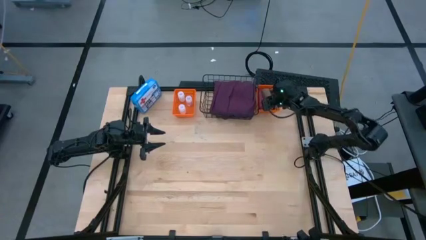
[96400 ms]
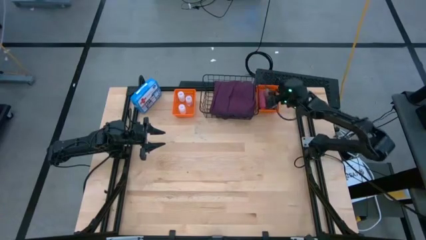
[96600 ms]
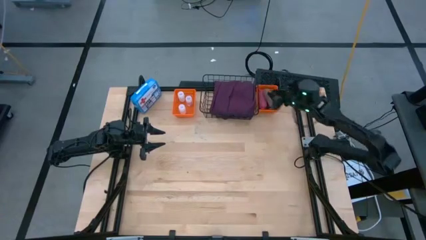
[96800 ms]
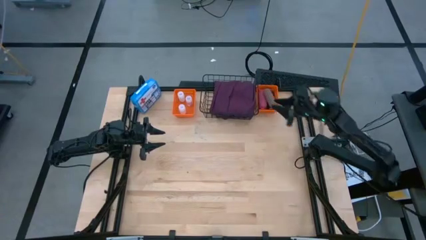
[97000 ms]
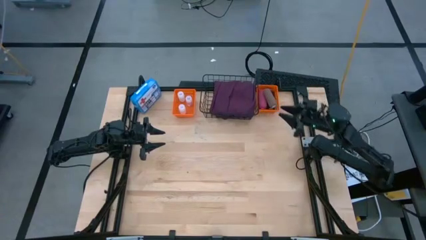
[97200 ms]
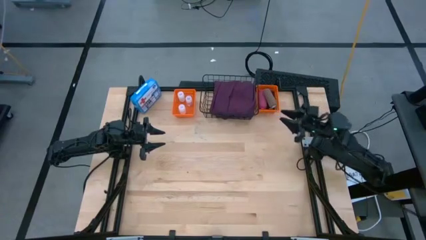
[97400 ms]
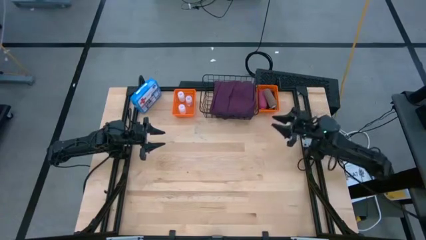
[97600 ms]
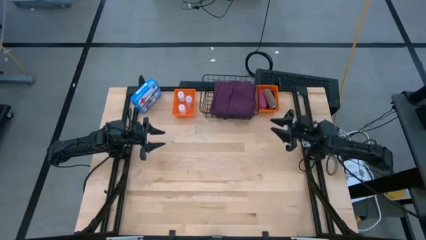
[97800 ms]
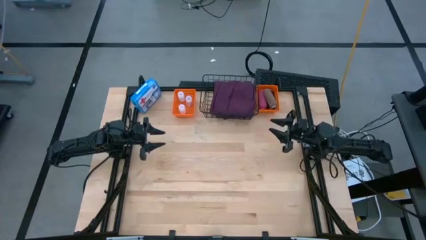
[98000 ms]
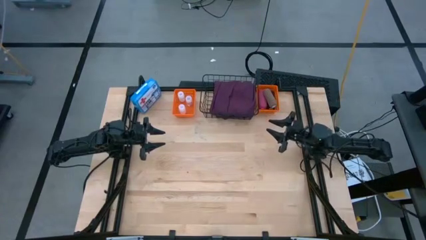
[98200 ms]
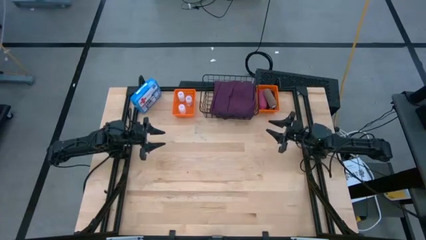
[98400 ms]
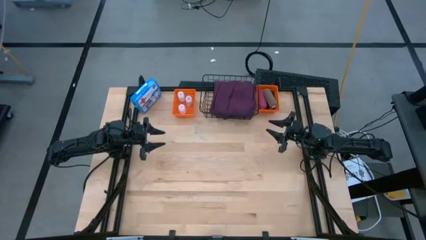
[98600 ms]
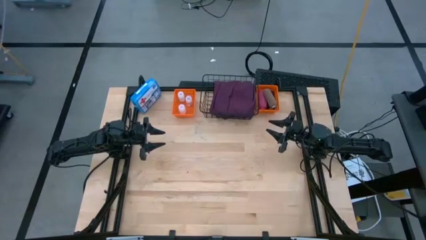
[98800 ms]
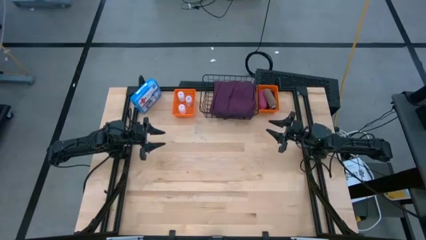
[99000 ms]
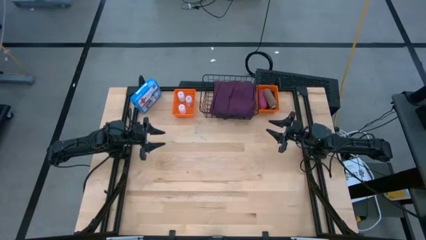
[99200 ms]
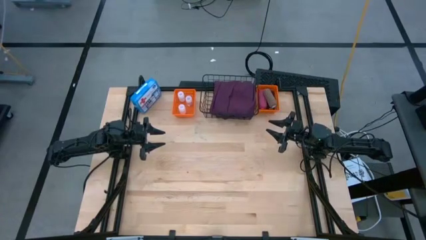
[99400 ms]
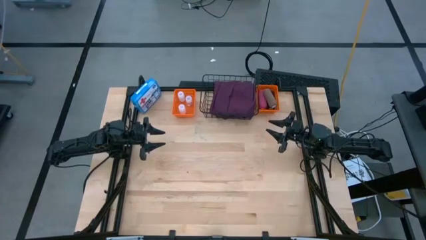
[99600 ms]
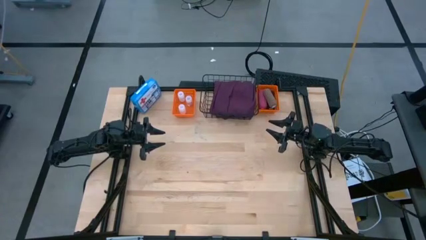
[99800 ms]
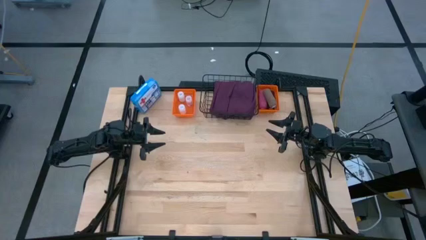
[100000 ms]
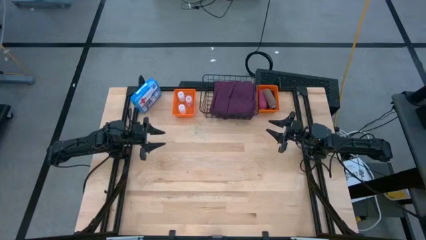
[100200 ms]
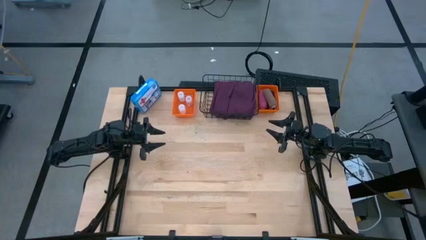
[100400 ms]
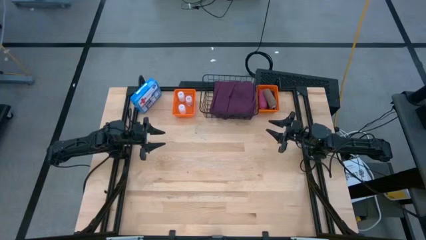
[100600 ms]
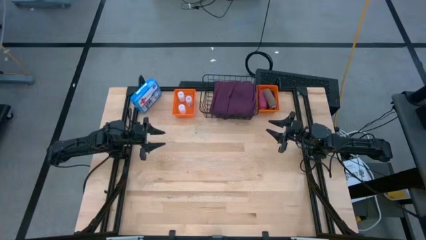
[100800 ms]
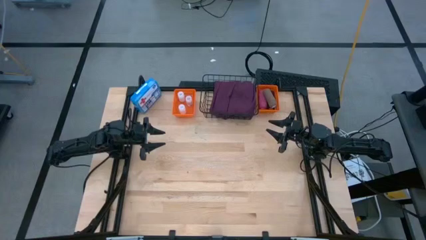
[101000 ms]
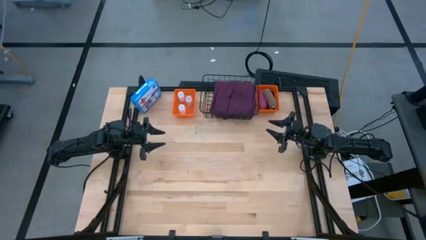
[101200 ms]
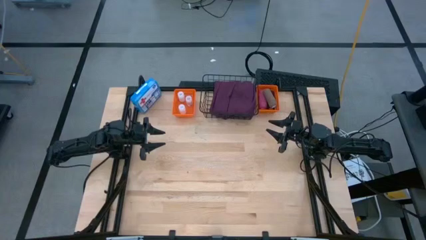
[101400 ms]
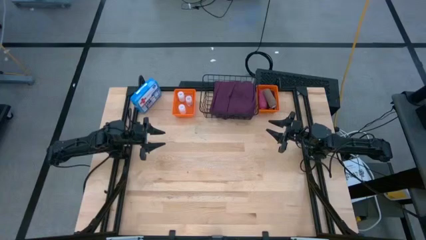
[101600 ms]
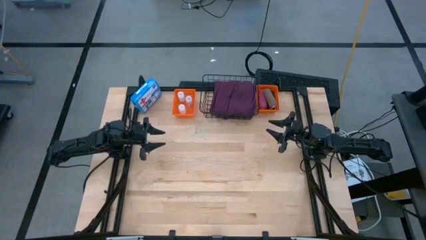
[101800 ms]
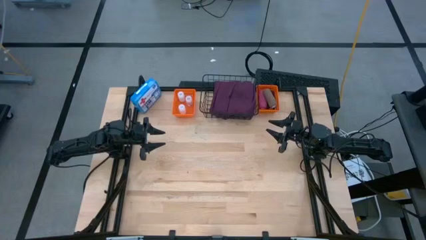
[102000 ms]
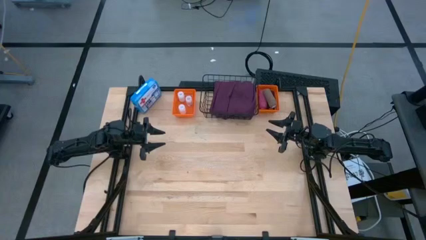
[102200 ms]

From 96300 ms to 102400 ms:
Task: Pick & place medical supplies in basket/bin
Return to Home Position

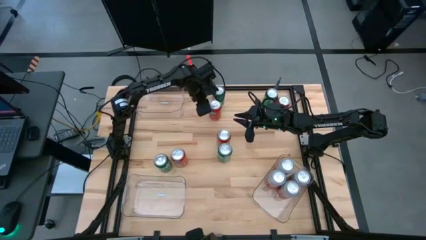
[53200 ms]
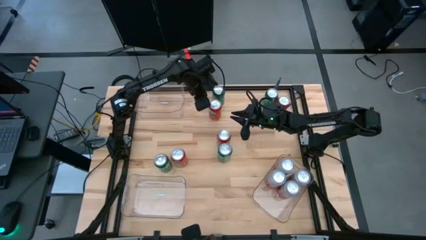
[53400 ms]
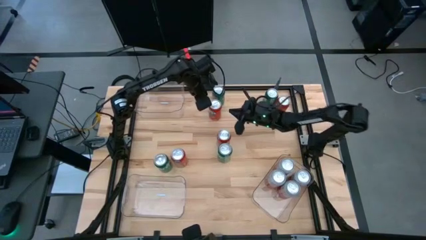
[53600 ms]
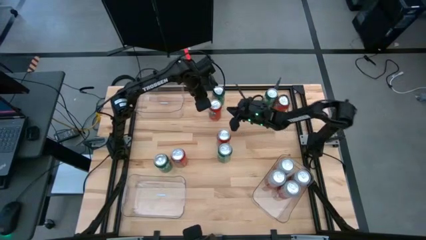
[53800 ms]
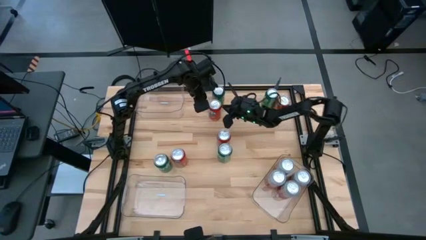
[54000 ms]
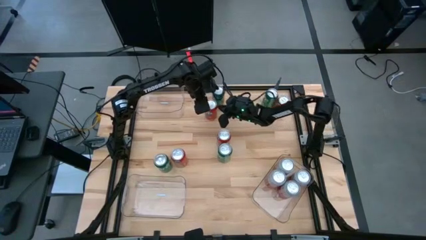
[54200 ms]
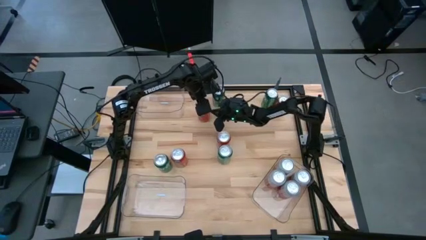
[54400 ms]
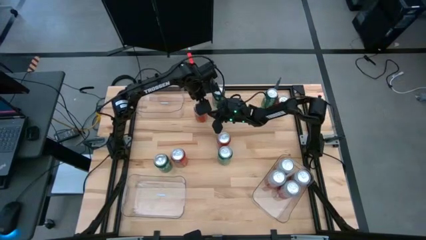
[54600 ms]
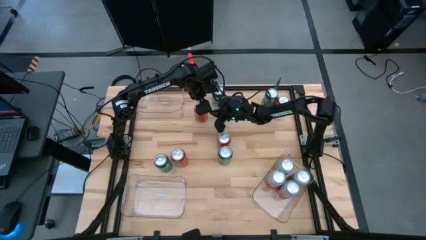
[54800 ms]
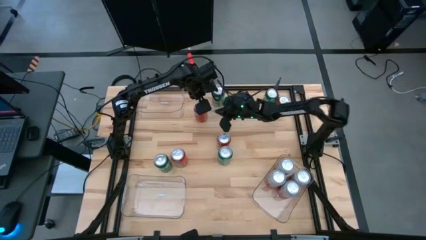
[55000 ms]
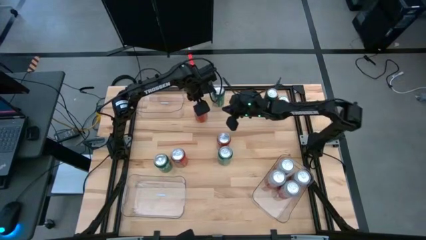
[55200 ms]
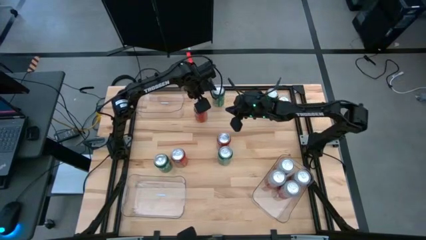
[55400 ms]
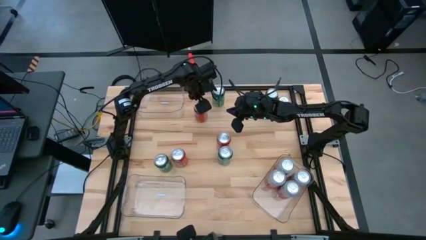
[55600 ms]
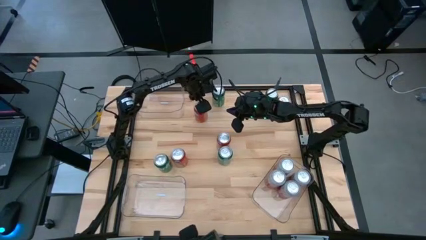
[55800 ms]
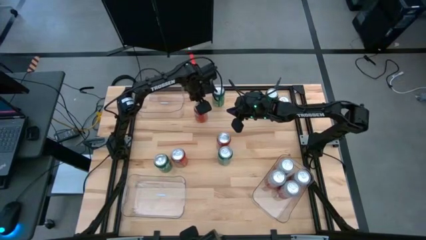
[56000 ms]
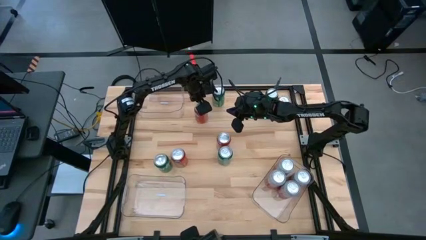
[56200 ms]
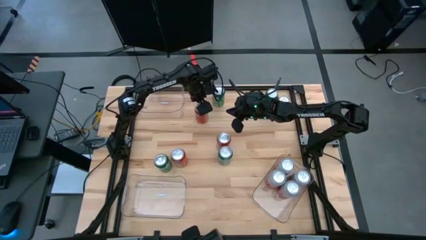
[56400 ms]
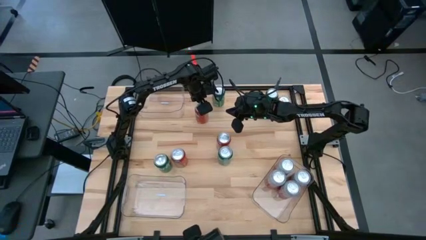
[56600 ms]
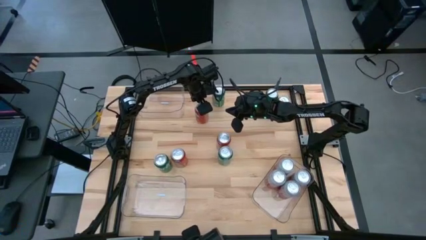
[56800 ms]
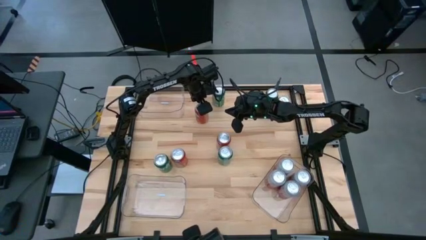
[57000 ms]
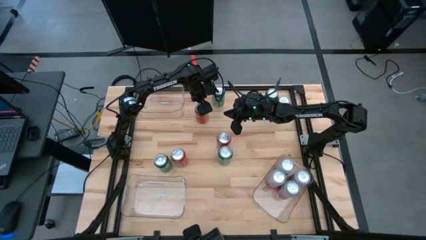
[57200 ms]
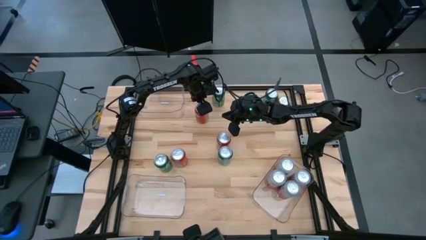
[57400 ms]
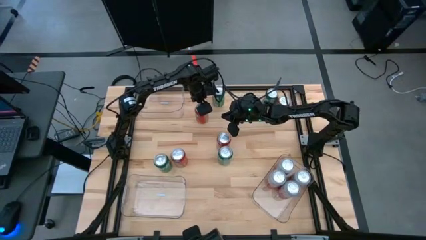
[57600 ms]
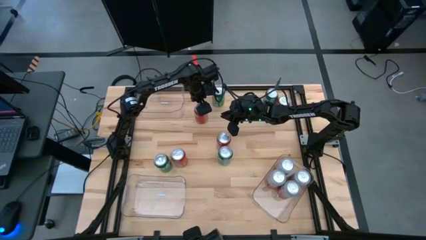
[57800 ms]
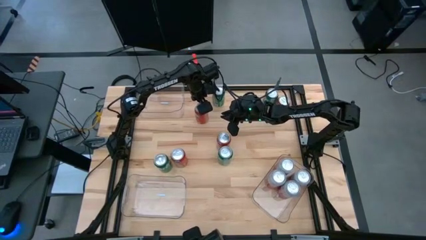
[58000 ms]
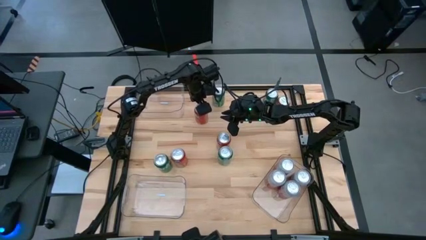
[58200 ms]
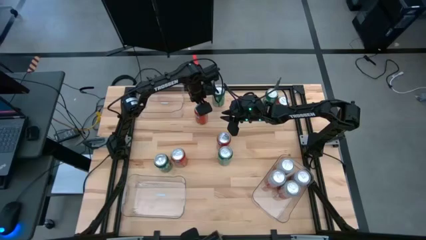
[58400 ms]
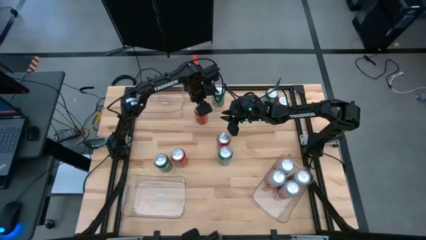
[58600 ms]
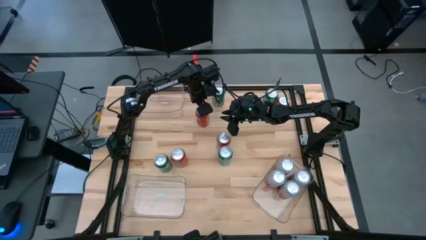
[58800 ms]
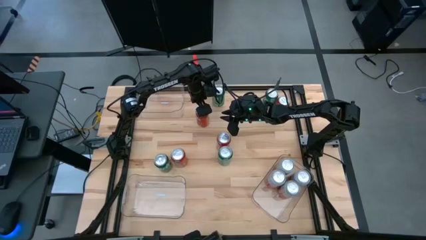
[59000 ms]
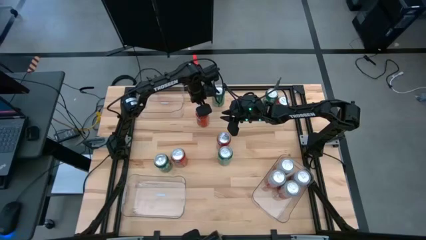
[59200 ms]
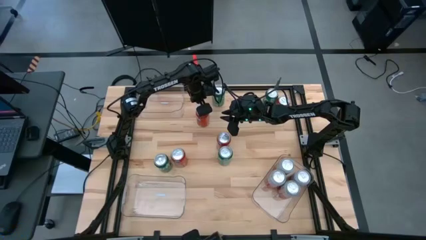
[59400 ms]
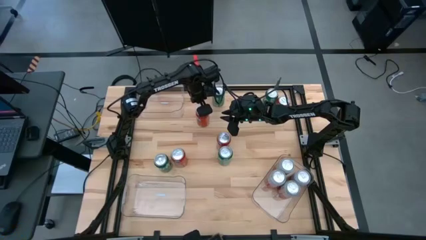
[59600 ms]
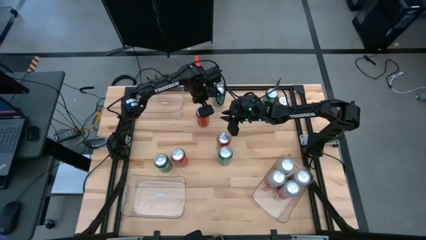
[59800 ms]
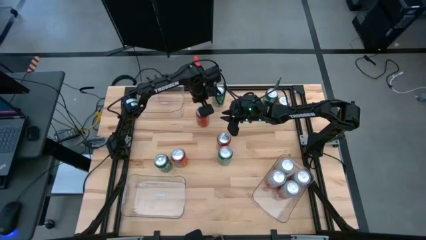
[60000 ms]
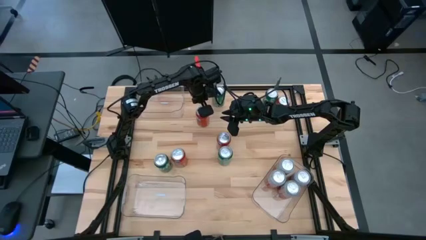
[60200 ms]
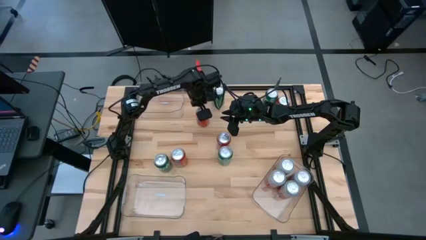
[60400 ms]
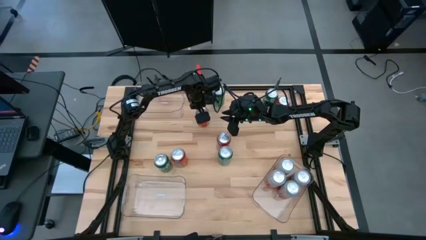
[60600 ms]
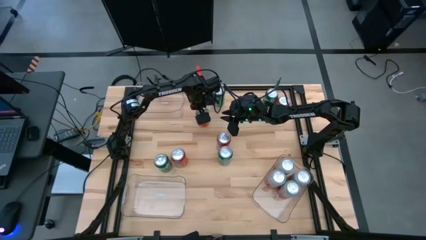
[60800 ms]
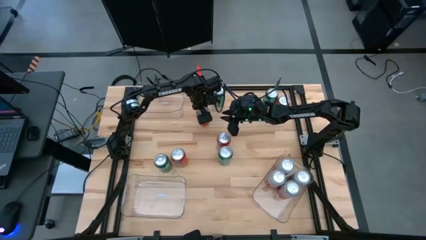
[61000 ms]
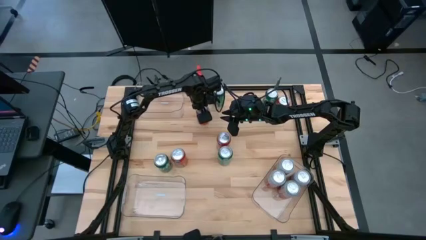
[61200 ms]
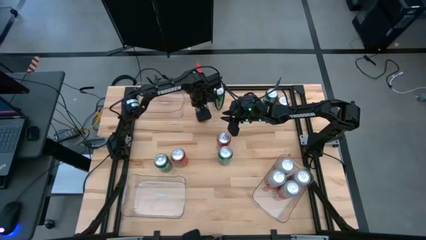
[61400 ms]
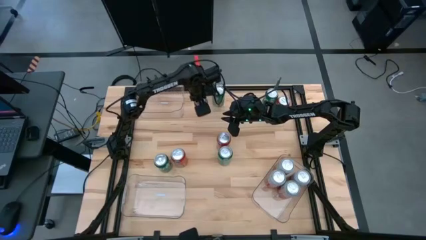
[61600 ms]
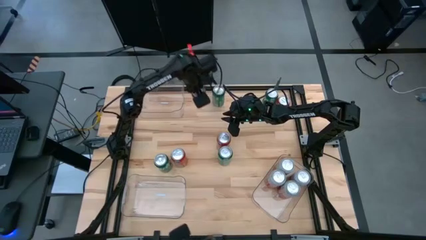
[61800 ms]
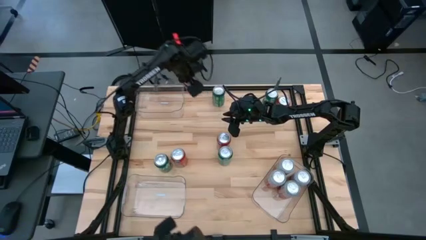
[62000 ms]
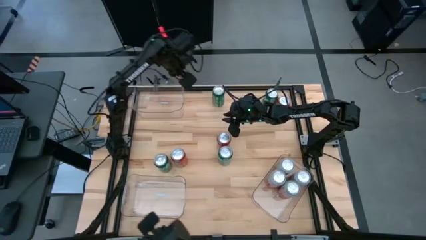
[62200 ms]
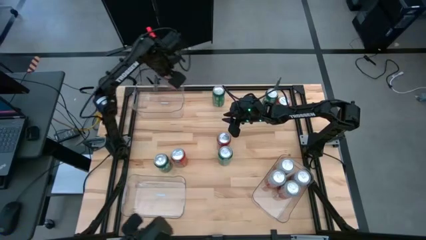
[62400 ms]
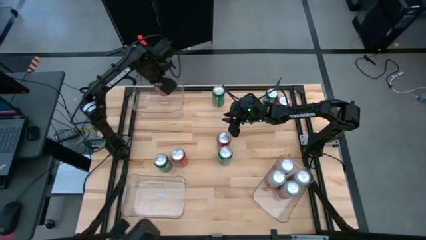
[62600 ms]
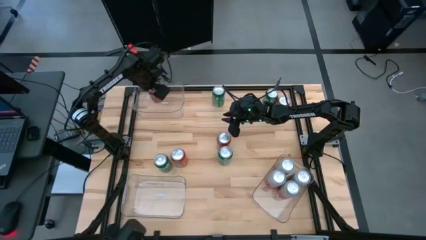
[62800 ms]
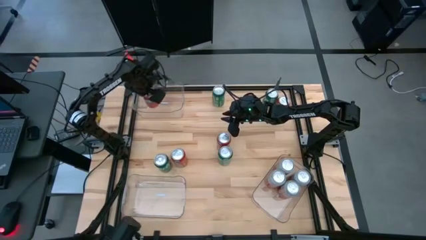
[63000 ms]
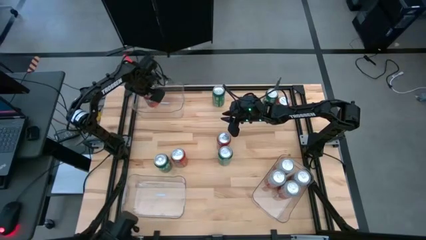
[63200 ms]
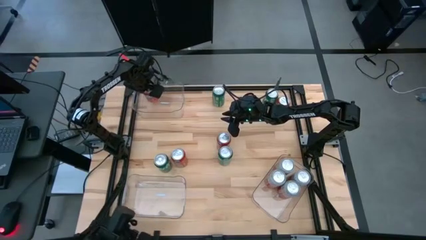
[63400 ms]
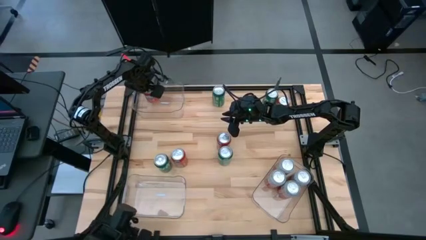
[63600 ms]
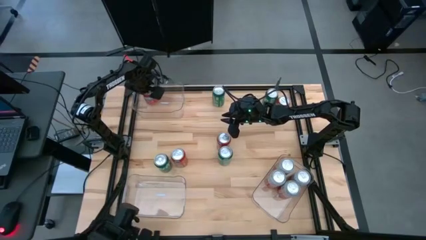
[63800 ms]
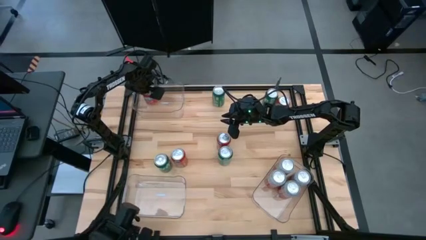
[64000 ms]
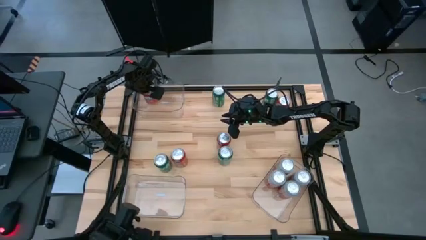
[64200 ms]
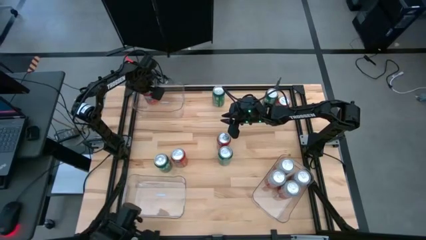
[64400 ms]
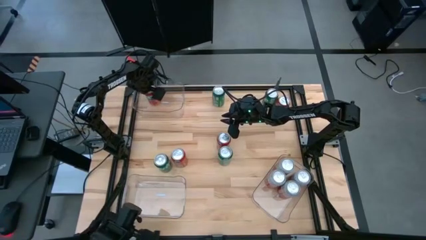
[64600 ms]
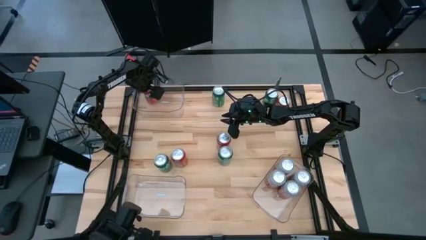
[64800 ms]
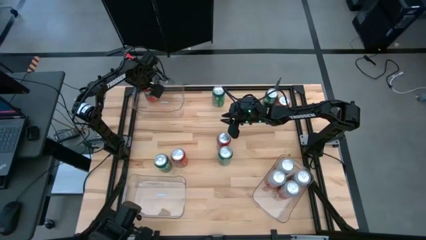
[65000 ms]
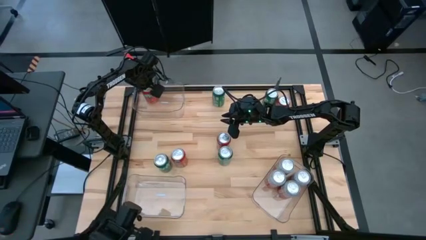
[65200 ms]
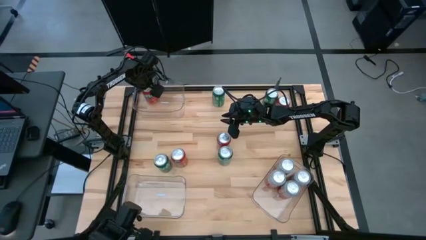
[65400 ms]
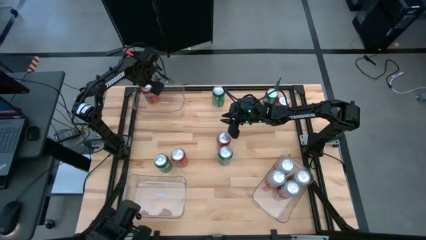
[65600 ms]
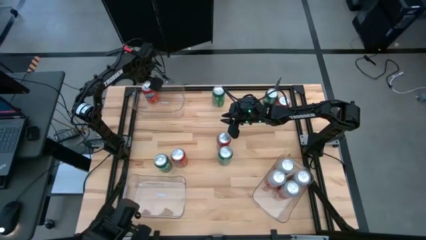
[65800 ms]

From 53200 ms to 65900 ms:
Task: Sort soda cans
Put the orange soda can into the top left transparent bin
